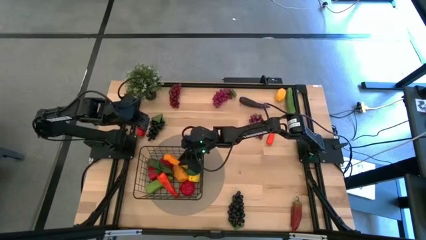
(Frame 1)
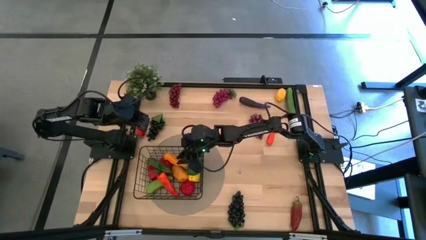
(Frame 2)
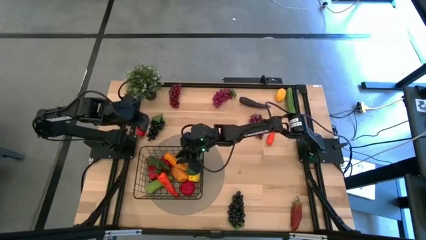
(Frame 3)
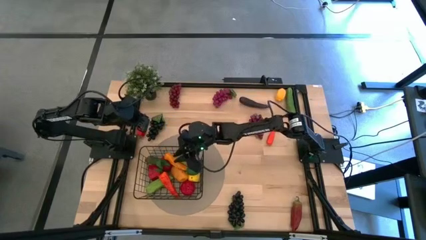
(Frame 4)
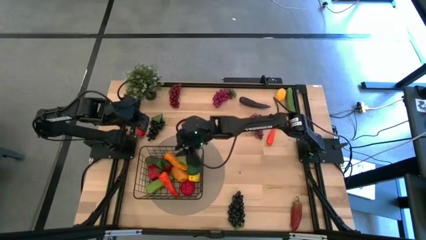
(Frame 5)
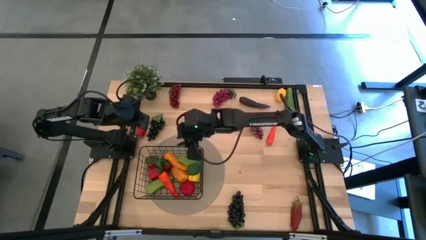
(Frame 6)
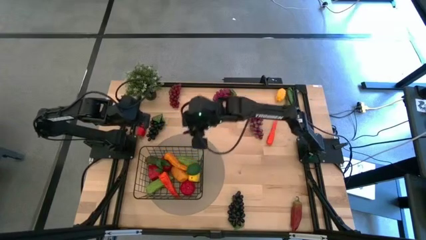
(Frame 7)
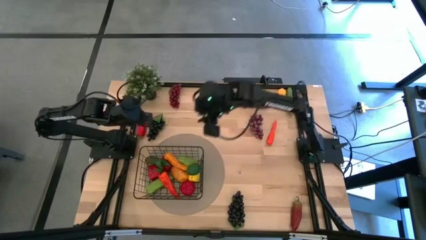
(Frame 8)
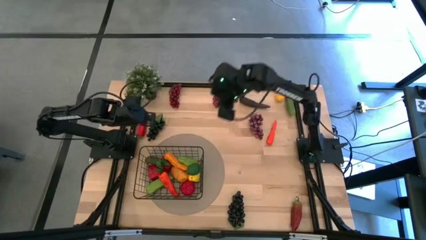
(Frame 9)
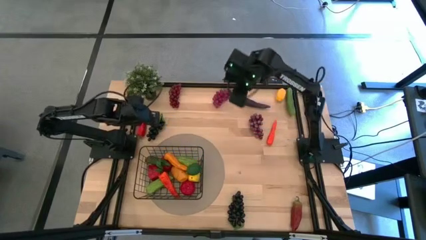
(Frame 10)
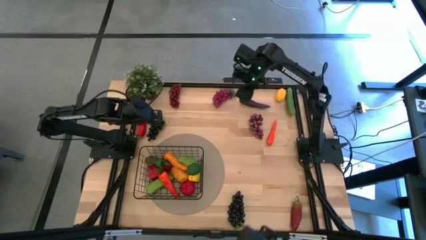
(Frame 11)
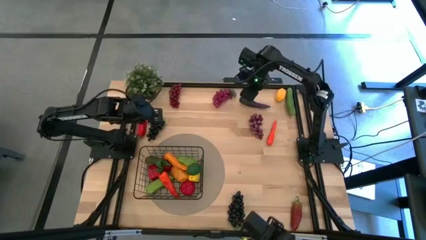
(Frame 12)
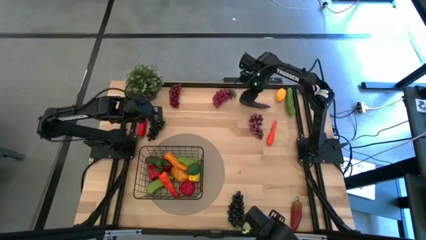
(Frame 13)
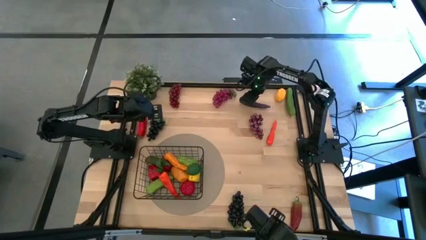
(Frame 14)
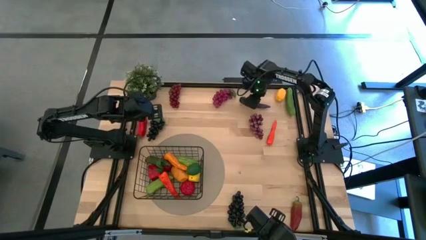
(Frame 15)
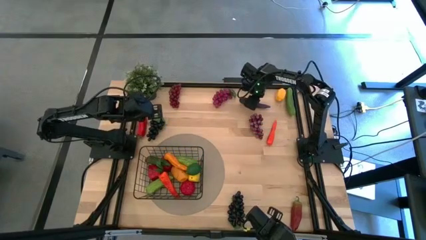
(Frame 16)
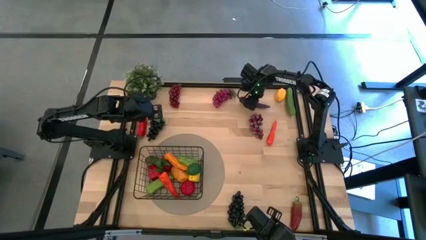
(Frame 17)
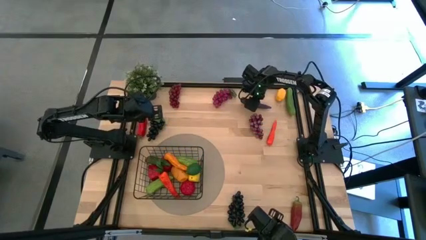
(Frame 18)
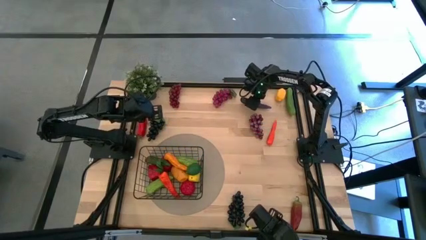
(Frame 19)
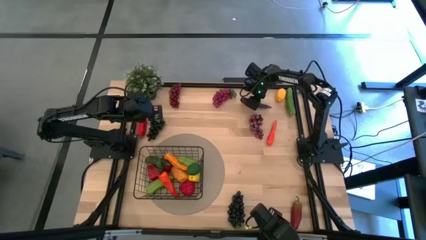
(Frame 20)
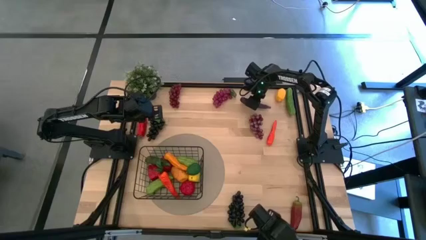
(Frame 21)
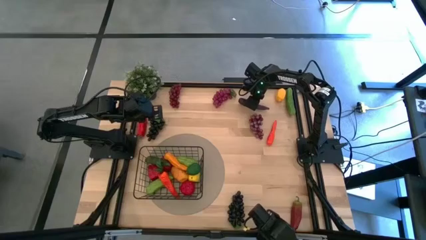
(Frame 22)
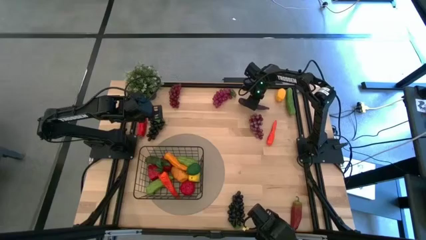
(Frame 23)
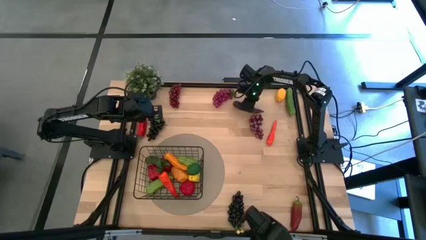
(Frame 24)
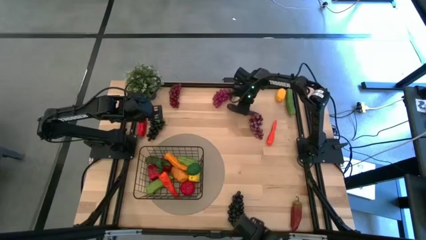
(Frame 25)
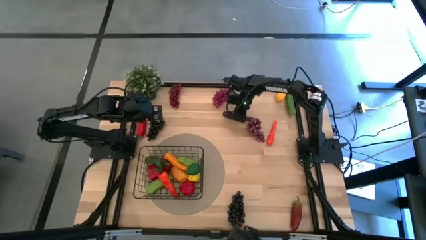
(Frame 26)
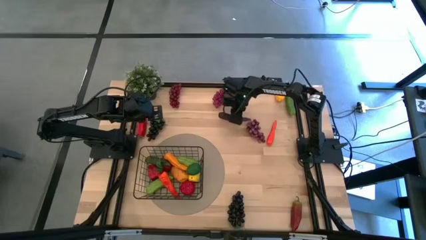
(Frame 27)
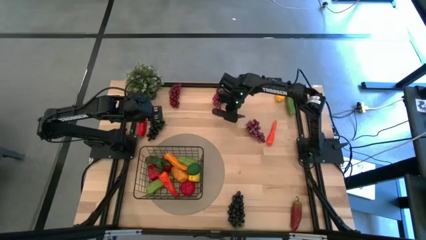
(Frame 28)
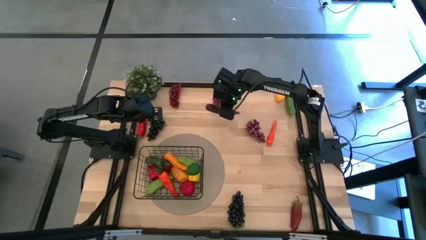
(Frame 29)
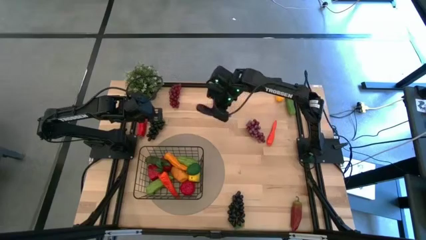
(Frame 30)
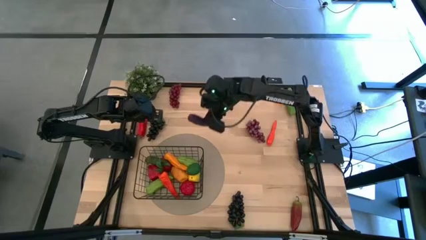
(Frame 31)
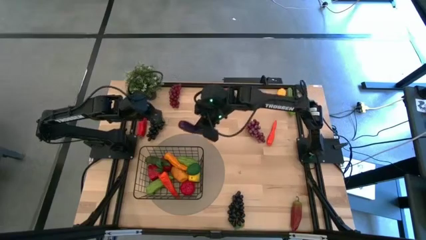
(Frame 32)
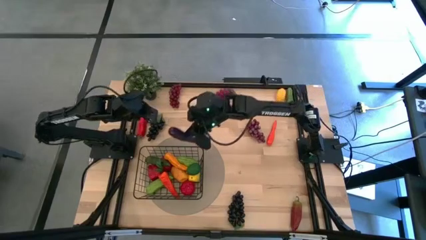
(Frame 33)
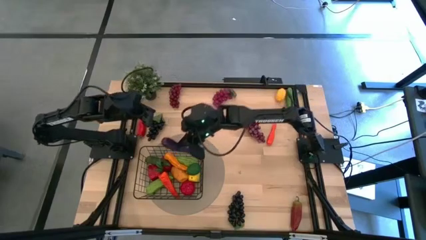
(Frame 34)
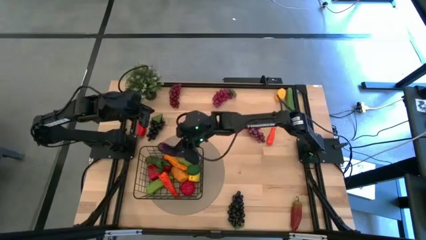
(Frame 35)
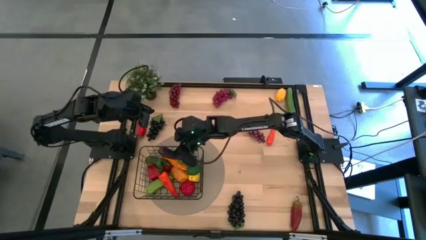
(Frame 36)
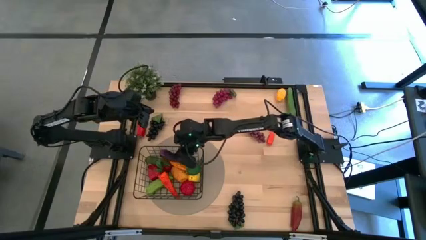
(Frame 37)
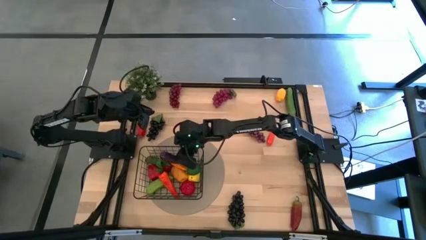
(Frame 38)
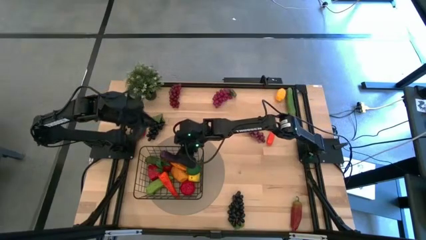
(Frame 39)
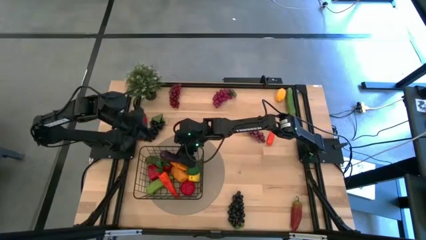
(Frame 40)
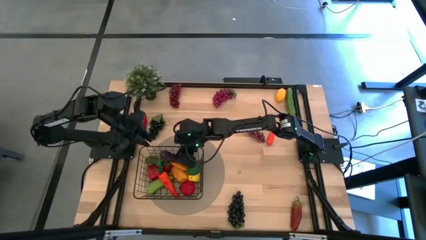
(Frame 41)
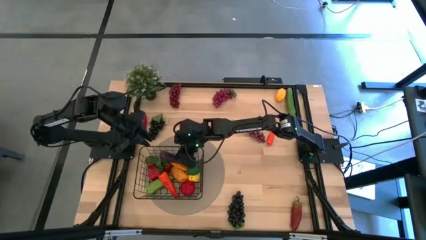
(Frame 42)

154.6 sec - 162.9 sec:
Task: Build produce basket
Put the purple eggplant into the black wire basket
